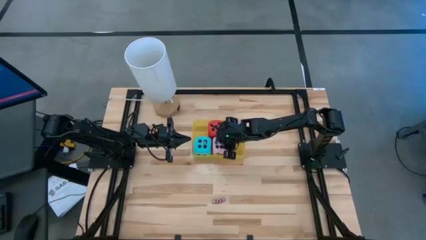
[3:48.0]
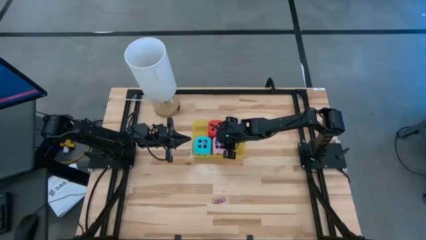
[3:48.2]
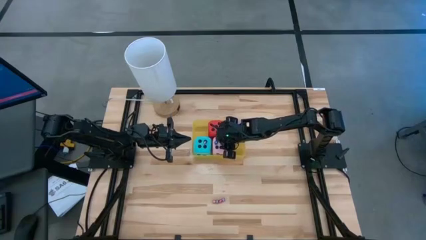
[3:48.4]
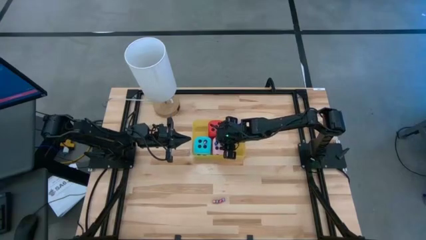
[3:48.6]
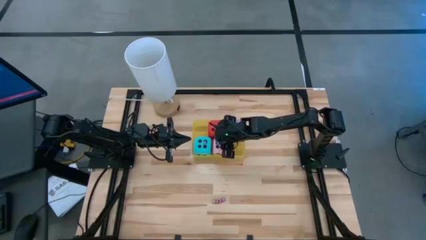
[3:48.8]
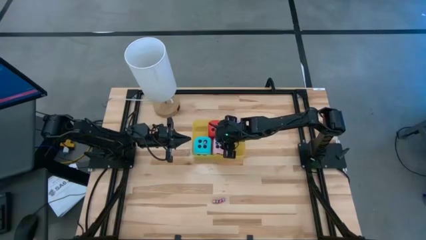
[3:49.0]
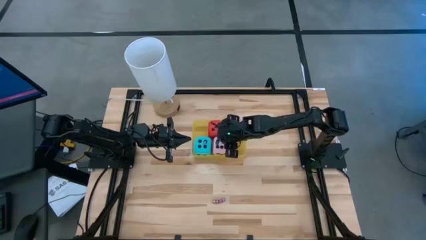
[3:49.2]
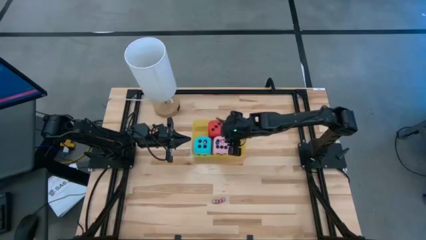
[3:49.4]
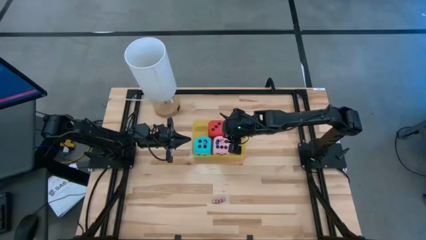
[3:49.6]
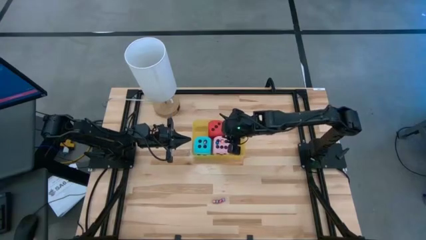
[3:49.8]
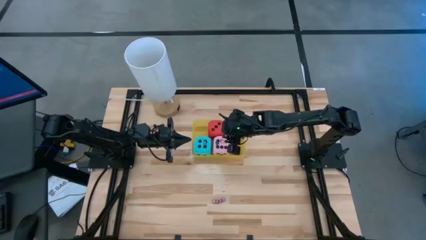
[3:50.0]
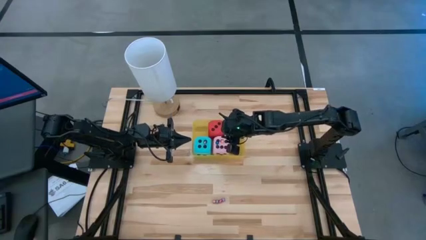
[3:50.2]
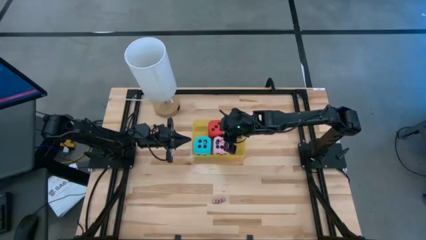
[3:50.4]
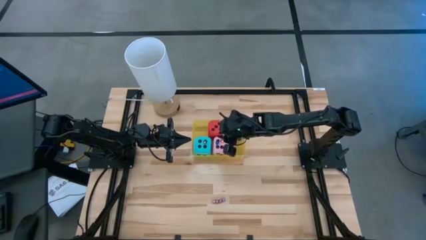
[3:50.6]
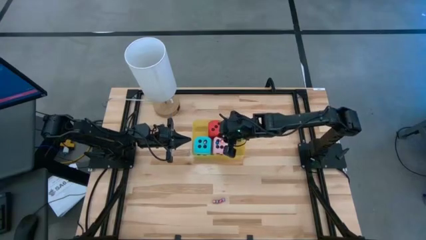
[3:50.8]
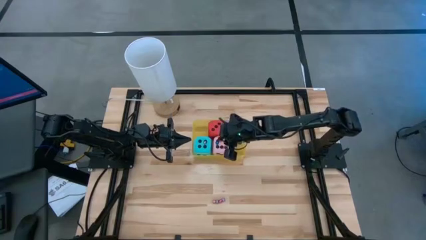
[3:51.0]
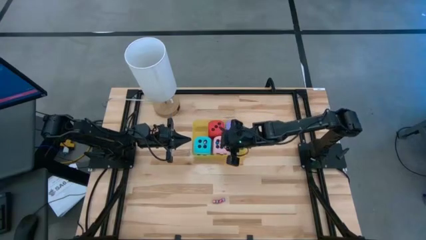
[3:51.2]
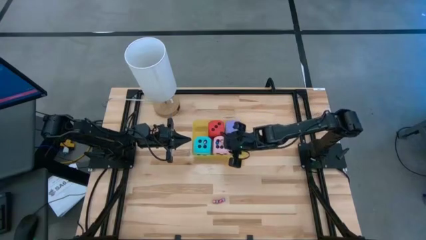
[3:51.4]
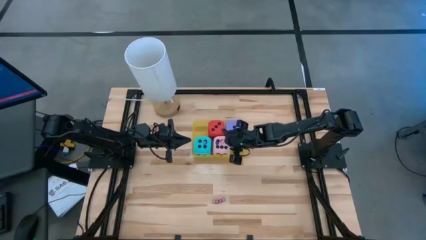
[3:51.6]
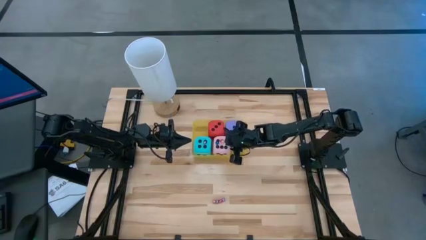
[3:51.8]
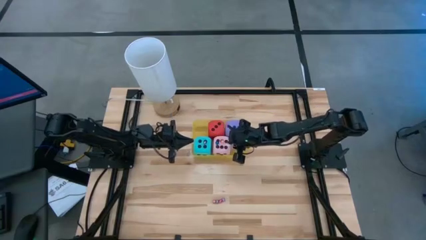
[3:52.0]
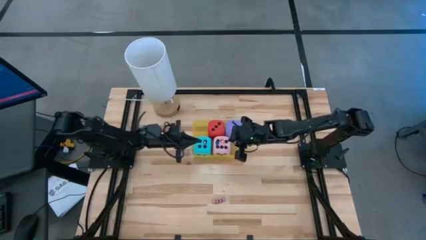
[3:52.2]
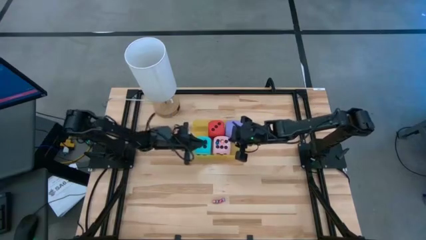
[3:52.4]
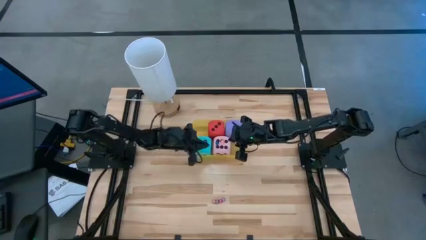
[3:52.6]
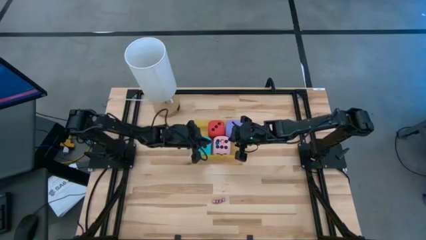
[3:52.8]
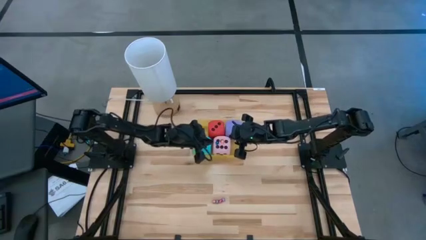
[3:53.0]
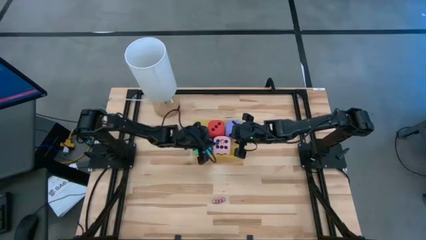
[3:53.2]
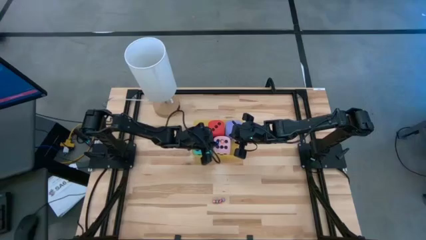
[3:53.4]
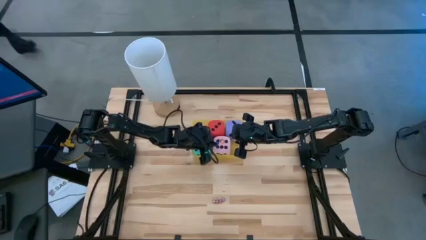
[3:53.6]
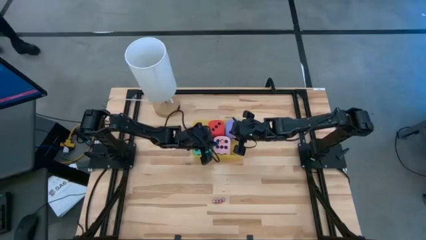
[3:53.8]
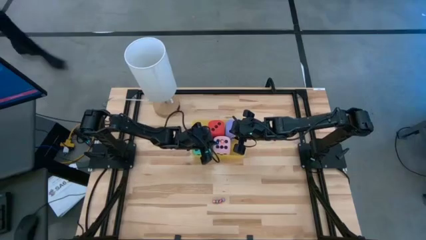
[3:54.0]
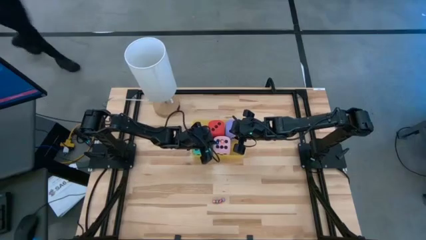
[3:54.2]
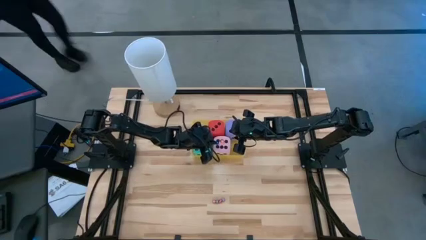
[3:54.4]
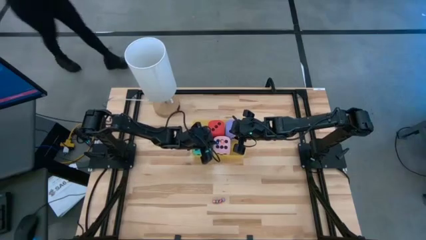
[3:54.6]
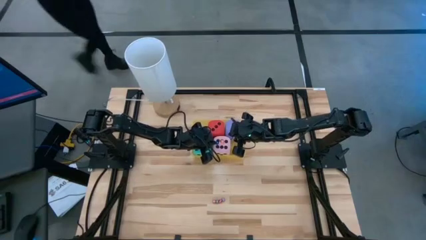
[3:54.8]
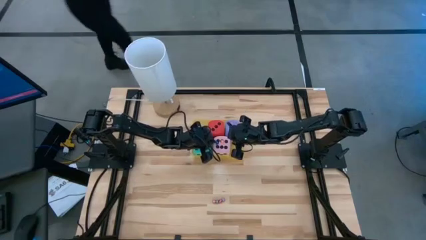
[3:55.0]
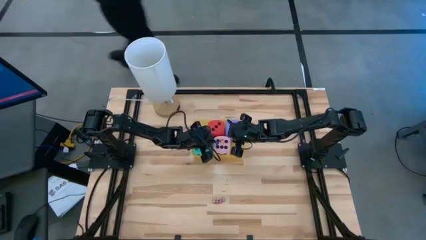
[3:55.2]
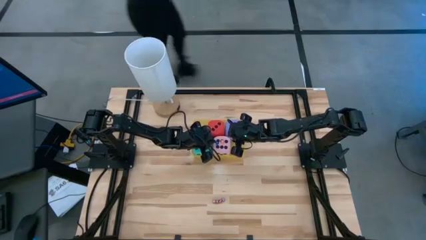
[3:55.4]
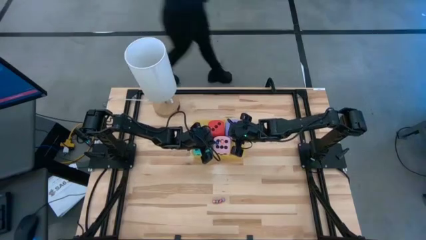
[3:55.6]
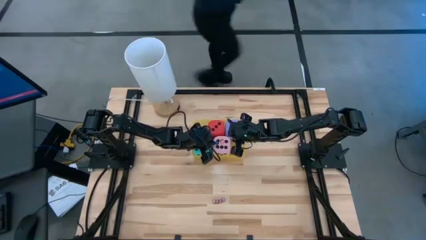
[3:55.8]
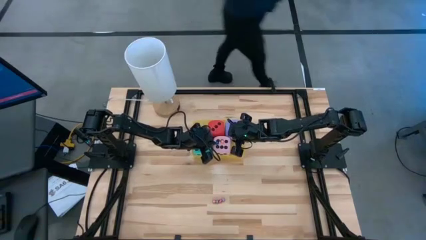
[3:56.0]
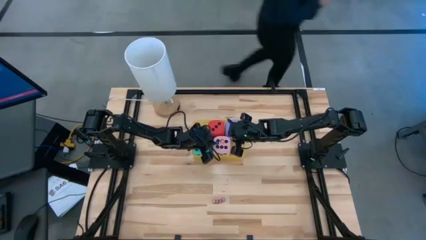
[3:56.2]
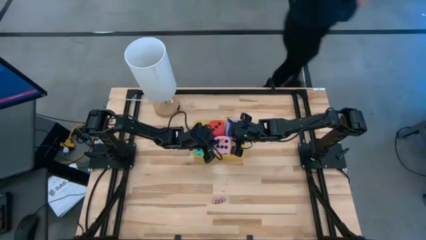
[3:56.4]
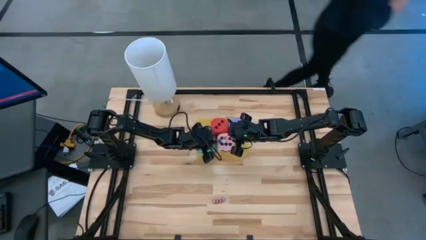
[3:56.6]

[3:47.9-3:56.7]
Task: Pick & Place Dice
Adjust the blue dice in the yellow bin

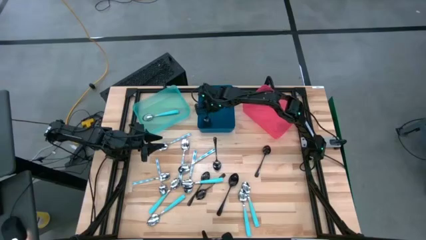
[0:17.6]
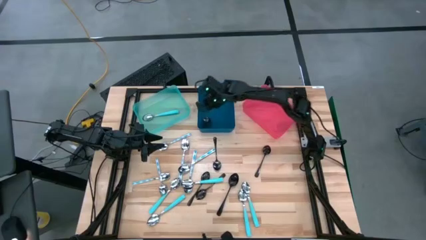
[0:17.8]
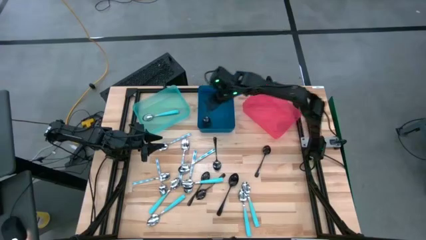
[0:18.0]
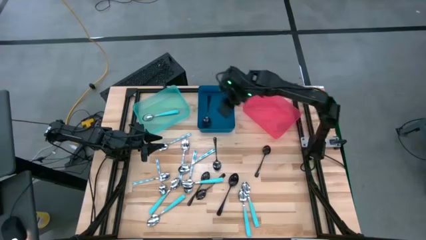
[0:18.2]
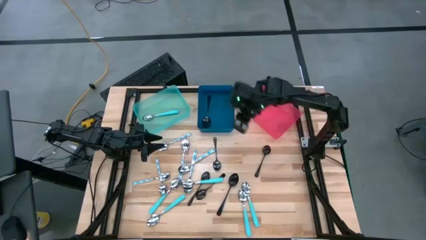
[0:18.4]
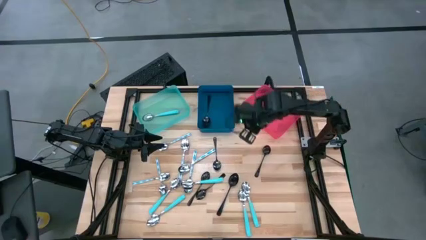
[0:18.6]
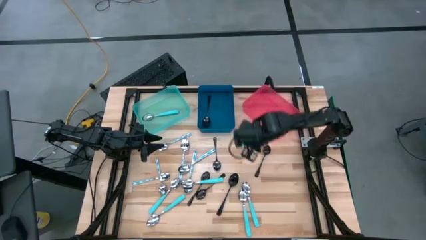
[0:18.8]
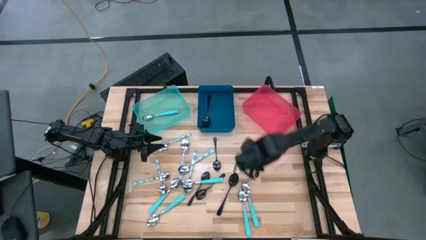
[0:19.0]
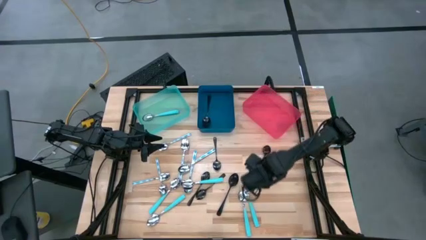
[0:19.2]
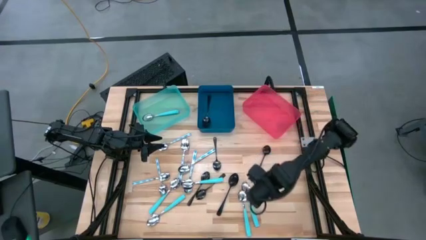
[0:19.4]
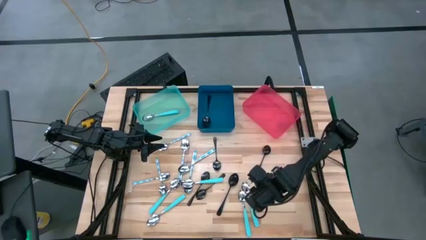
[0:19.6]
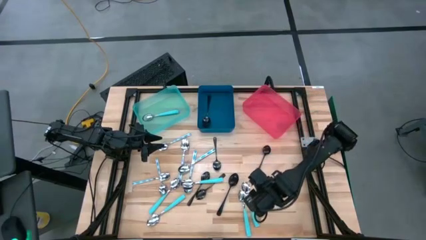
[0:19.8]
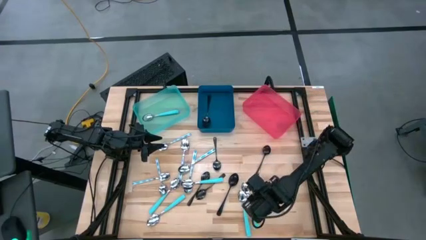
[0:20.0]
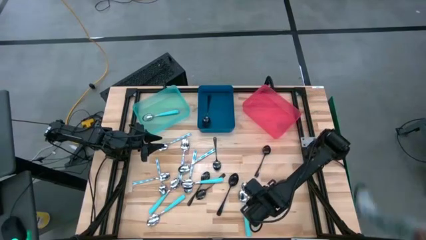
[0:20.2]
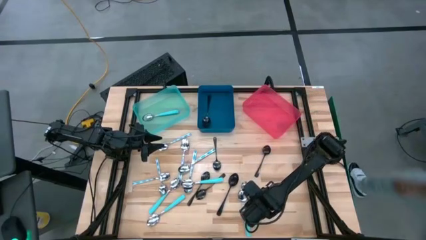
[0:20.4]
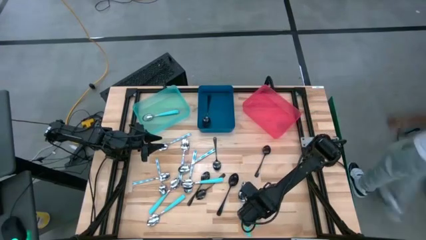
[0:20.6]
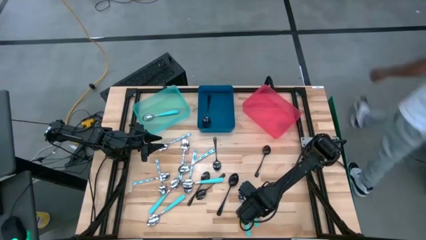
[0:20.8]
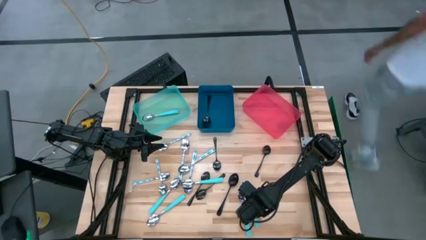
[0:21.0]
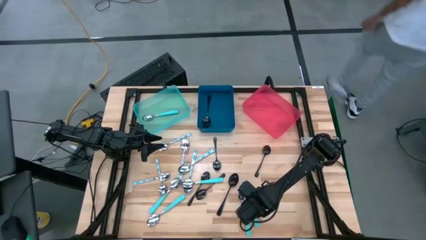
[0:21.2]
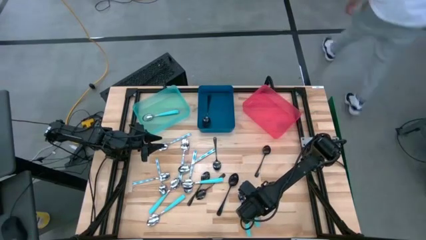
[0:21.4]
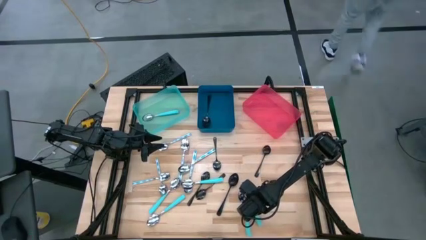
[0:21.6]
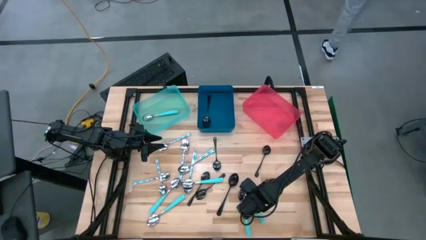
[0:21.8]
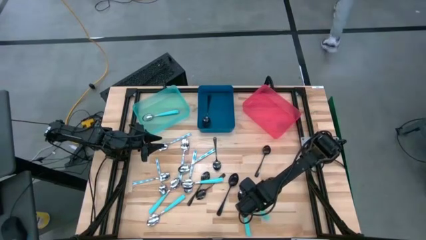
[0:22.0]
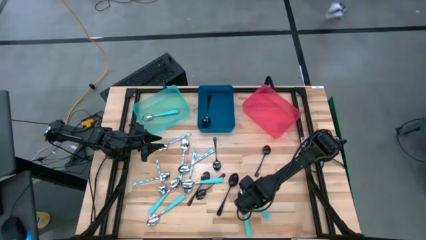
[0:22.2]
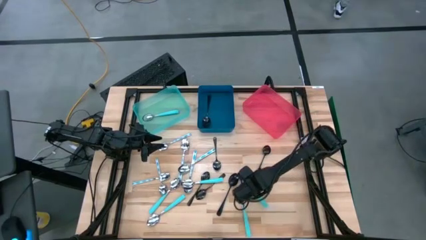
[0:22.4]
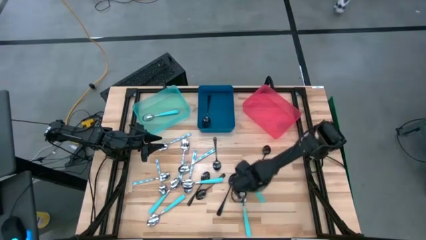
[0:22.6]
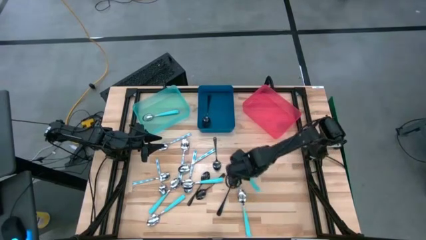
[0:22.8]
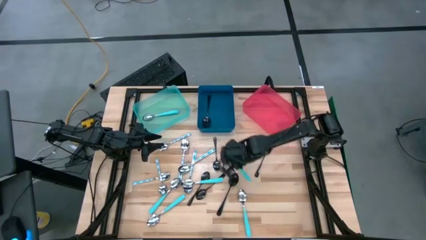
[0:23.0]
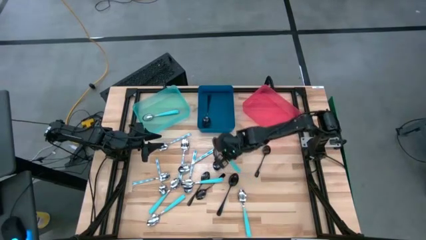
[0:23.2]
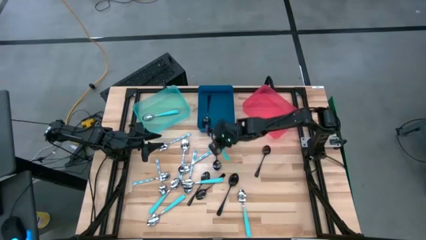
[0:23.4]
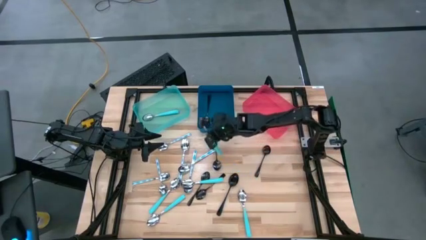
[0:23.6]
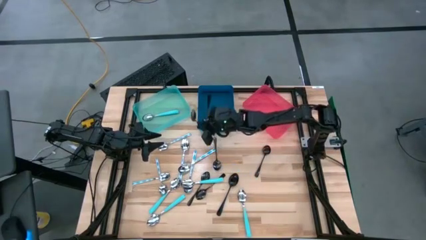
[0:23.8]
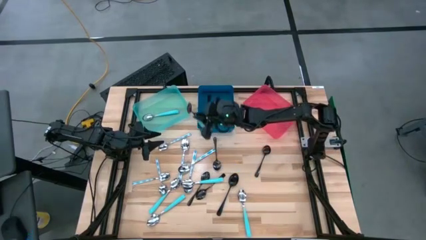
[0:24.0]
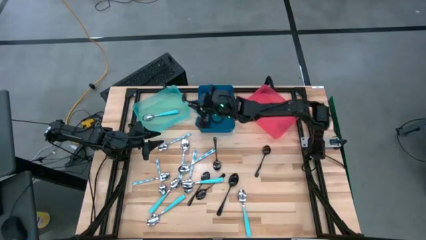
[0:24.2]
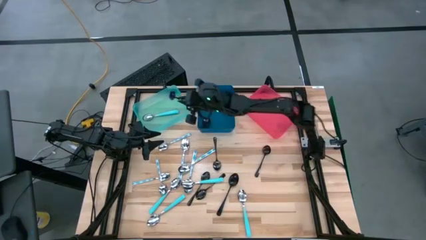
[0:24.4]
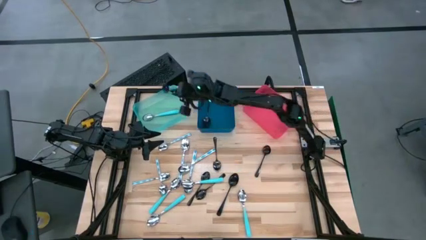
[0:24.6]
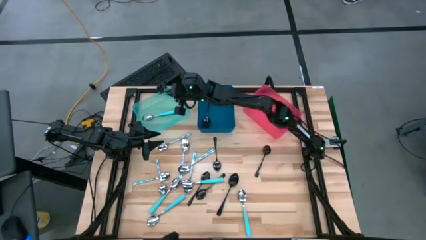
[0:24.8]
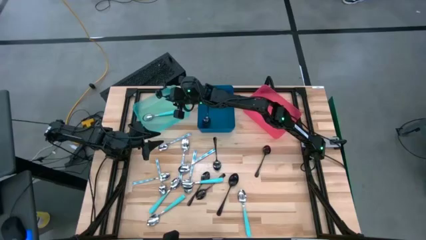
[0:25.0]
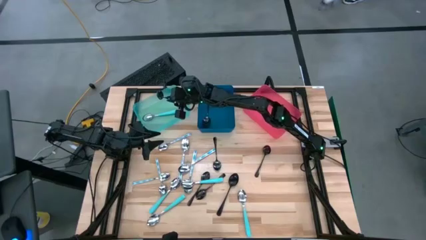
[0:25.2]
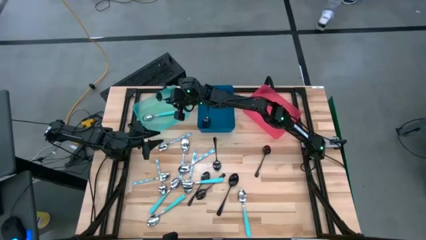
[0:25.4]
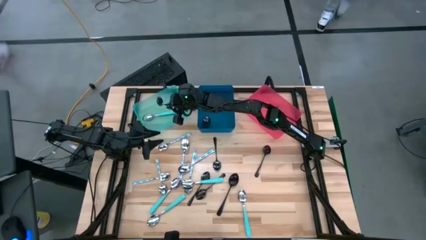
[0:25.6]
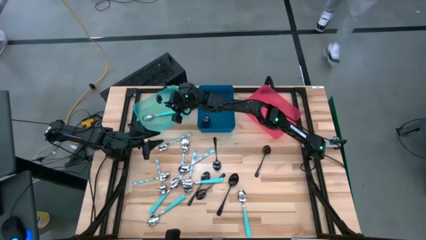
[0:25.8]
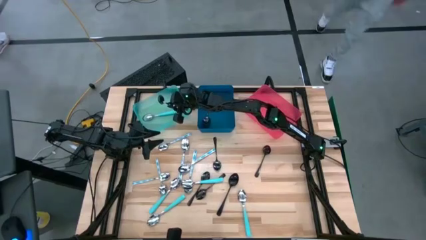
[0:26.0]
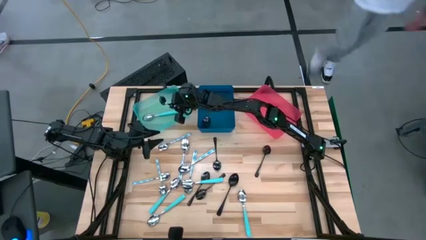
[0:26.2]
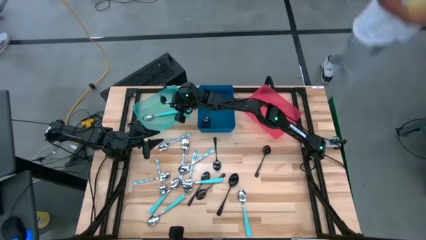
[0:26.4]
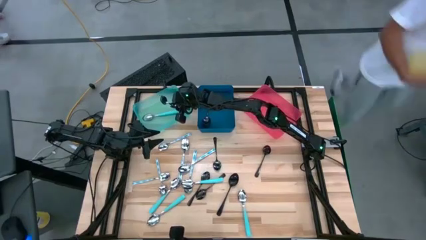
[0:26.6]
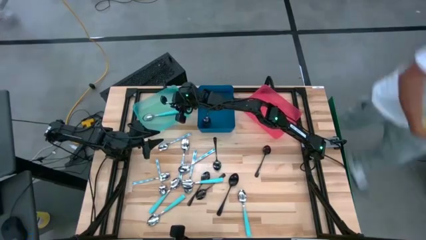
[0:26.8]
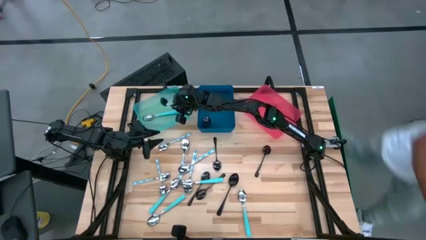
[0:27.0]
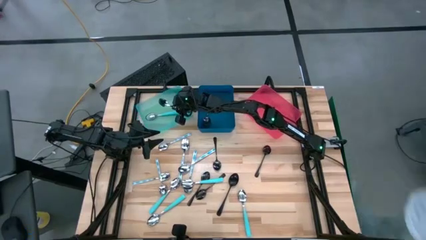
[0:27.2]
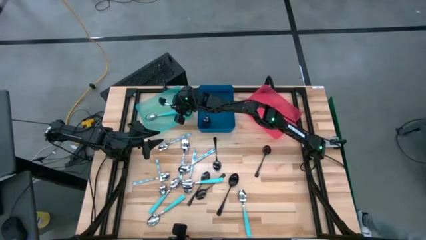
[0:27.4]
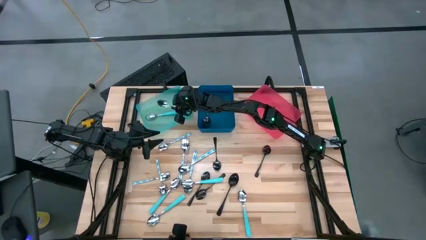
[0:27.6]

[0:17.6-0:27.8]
Task: Sort silverware by color (type)
Put the blue spoon into the light blue bin
